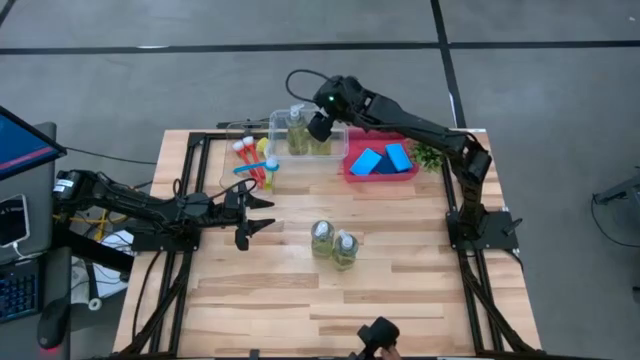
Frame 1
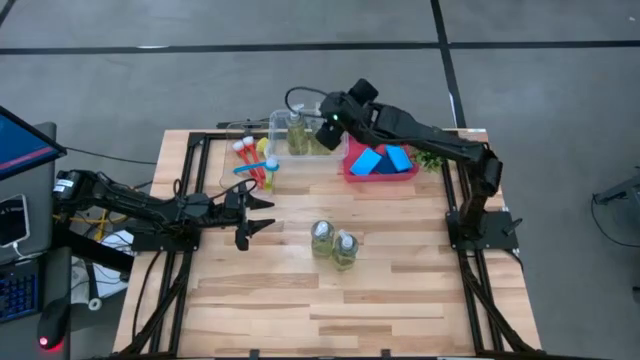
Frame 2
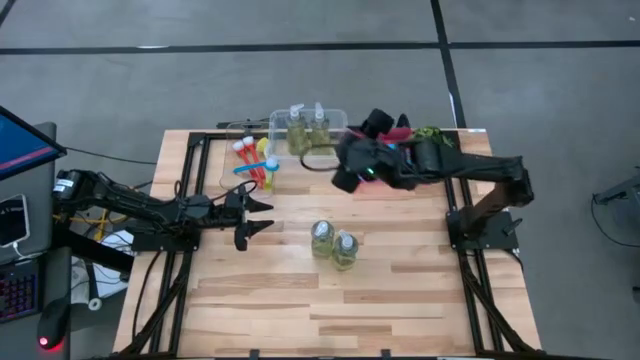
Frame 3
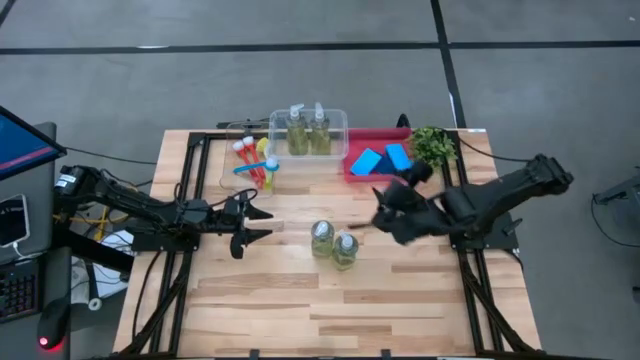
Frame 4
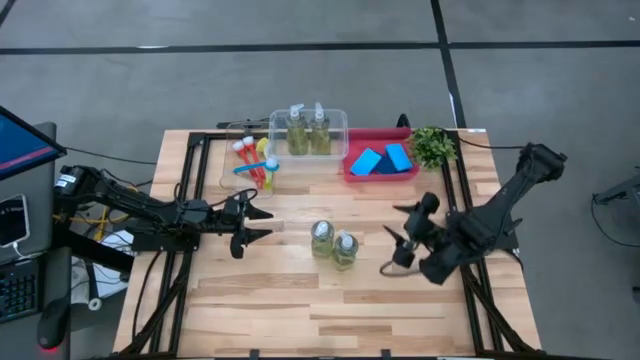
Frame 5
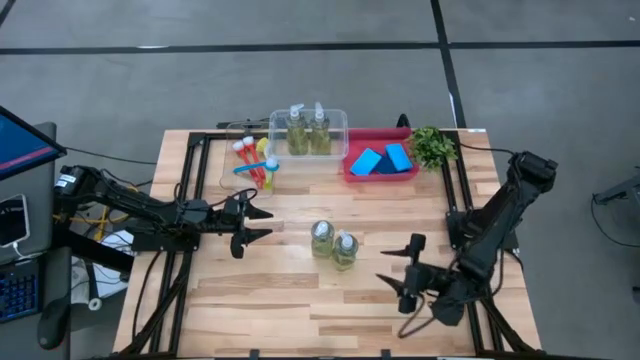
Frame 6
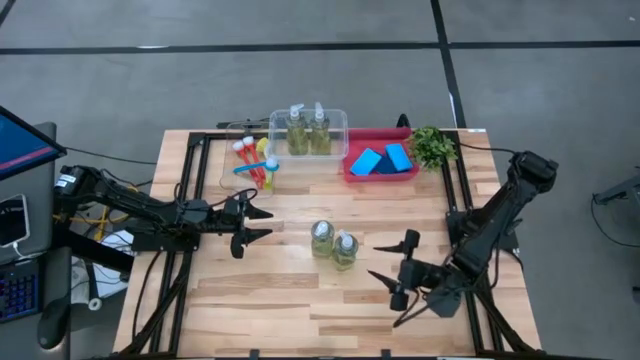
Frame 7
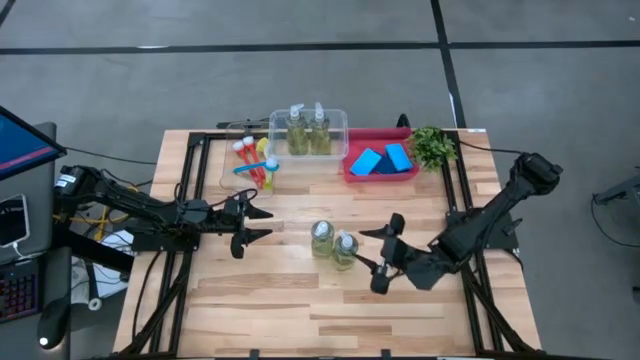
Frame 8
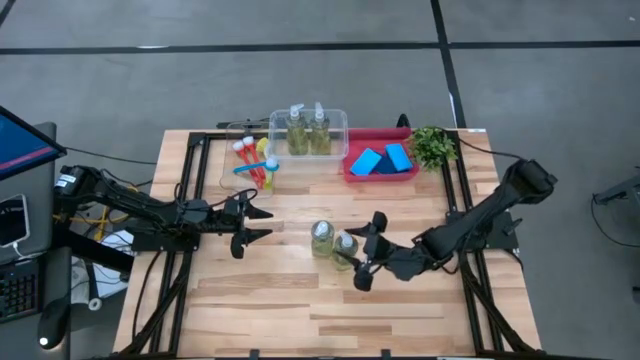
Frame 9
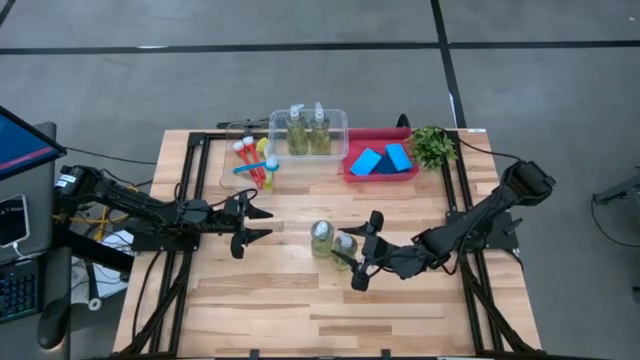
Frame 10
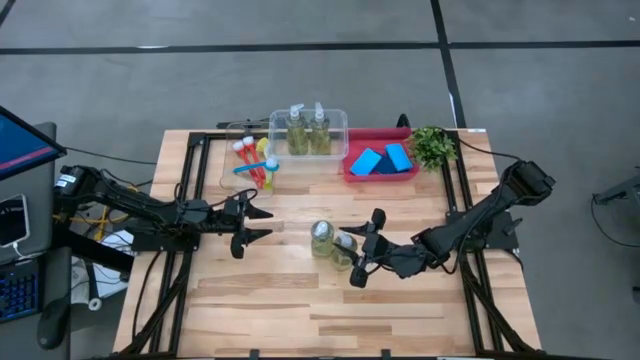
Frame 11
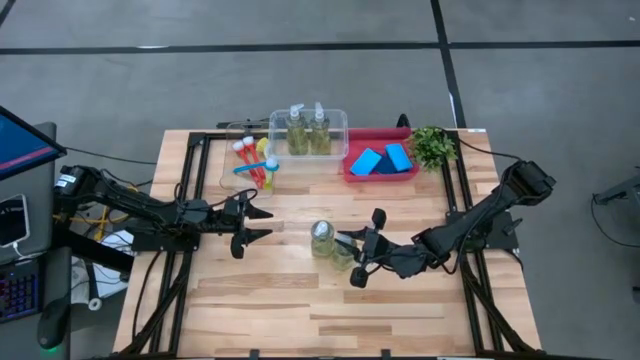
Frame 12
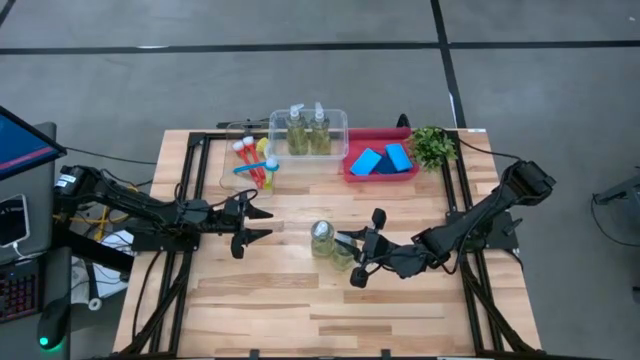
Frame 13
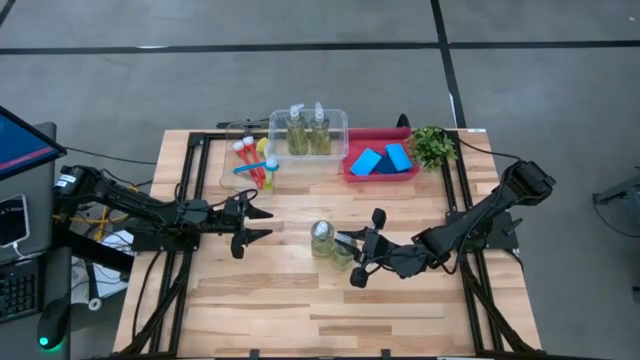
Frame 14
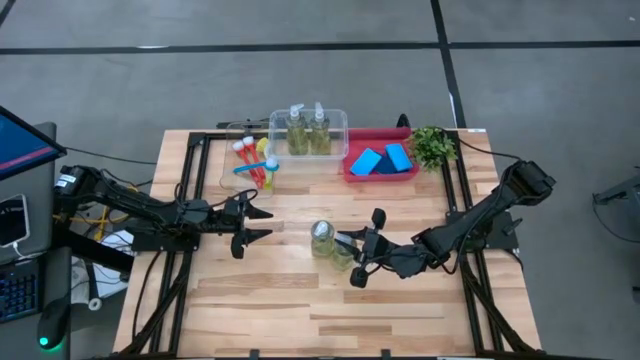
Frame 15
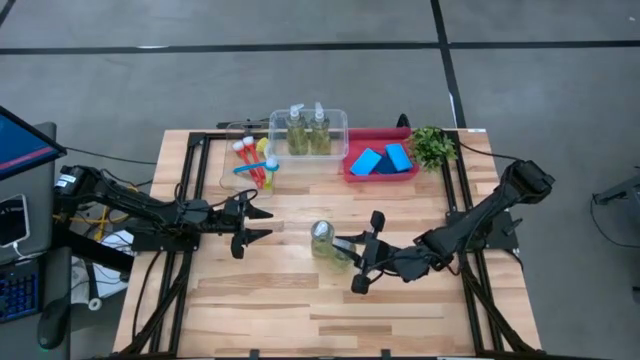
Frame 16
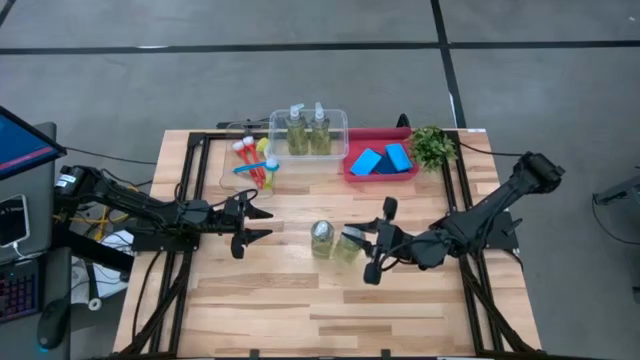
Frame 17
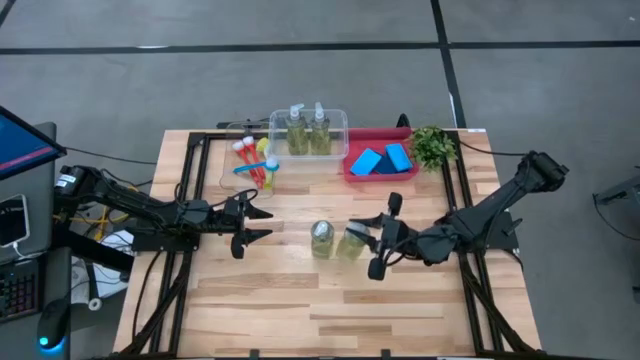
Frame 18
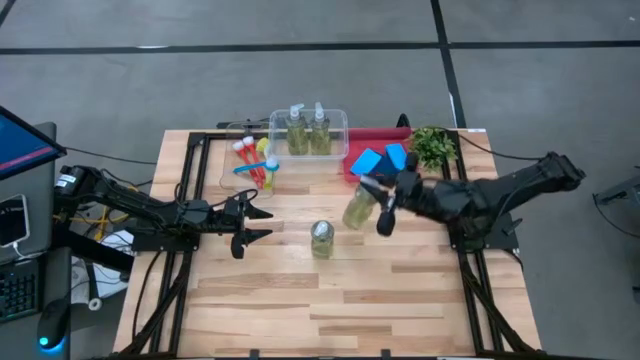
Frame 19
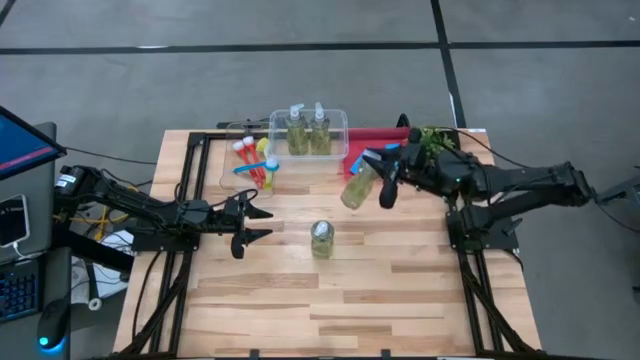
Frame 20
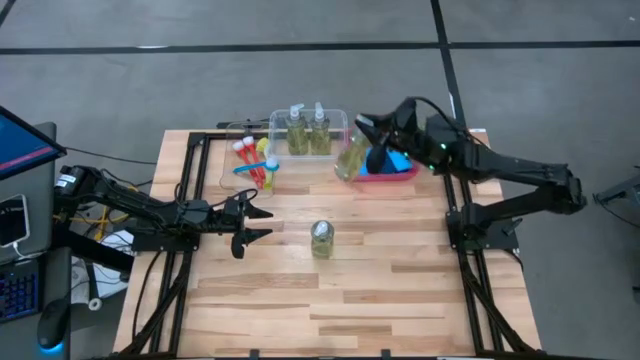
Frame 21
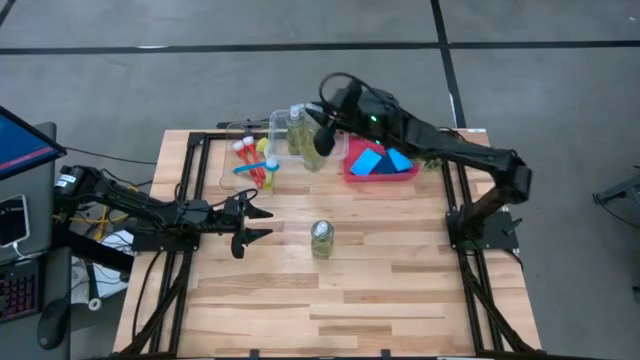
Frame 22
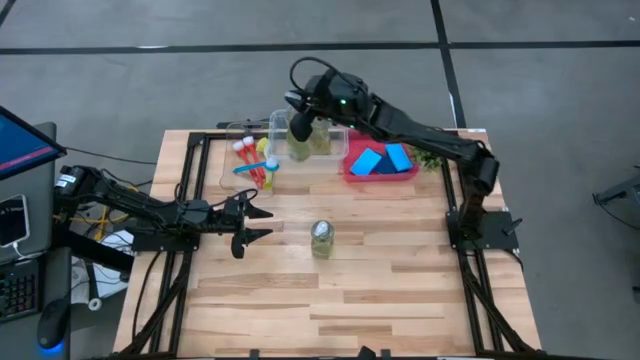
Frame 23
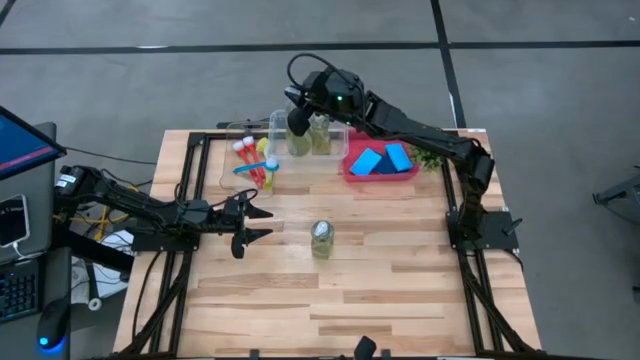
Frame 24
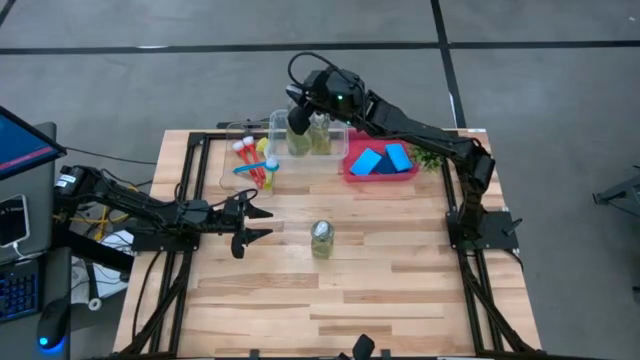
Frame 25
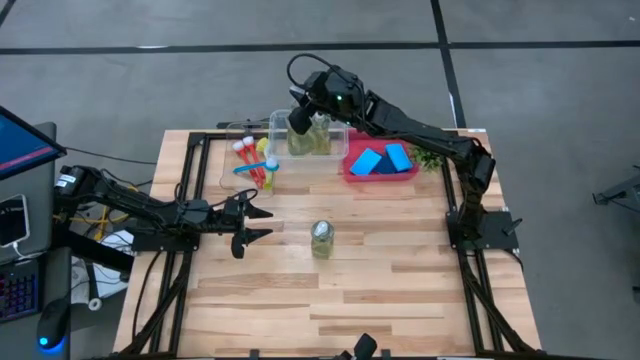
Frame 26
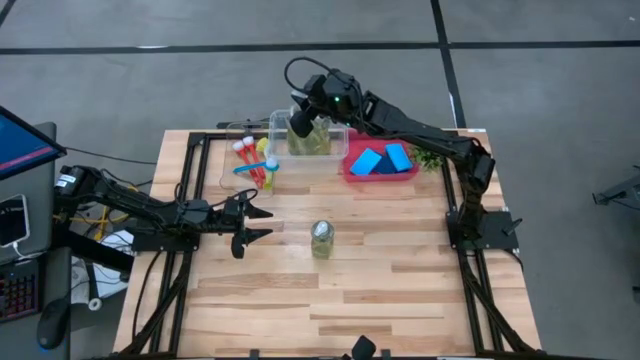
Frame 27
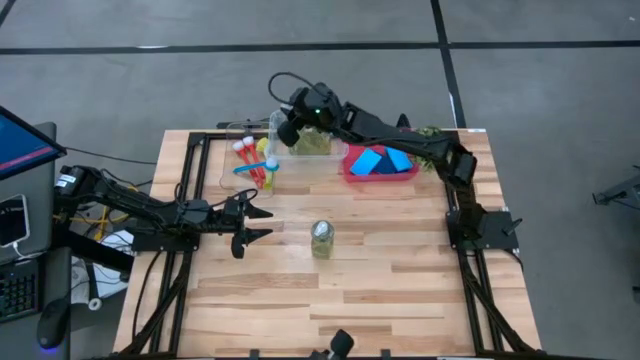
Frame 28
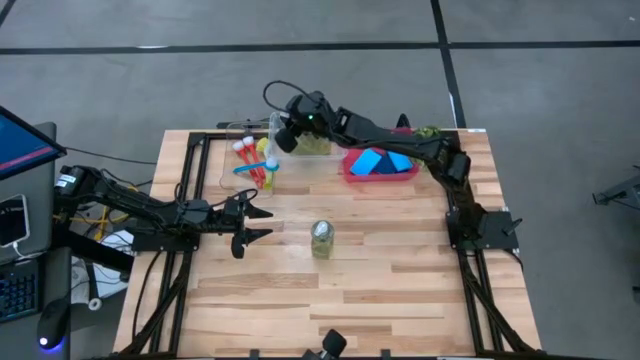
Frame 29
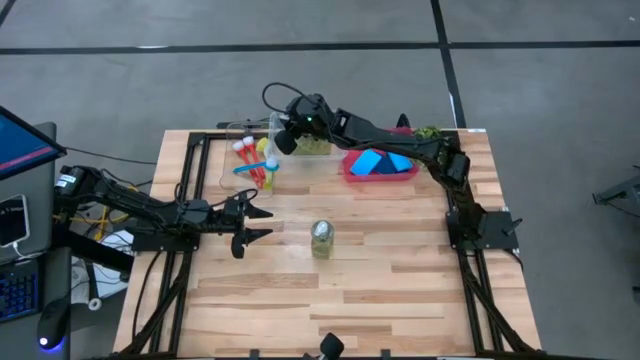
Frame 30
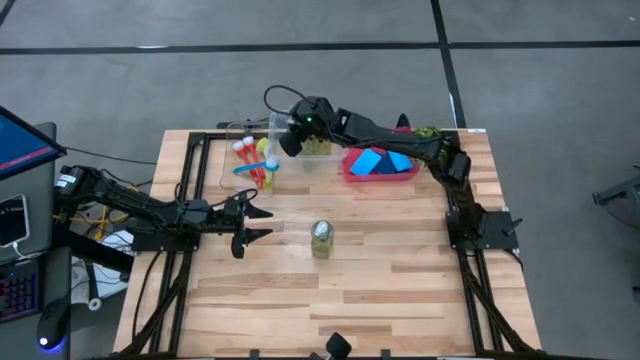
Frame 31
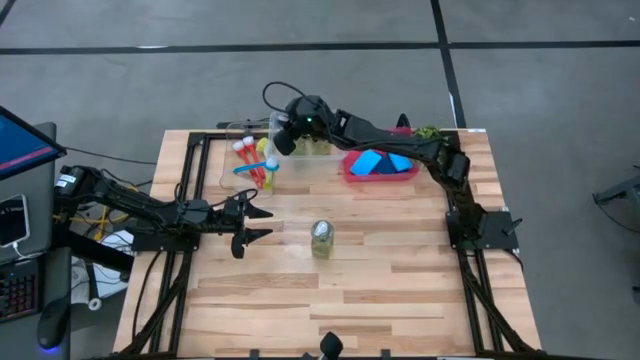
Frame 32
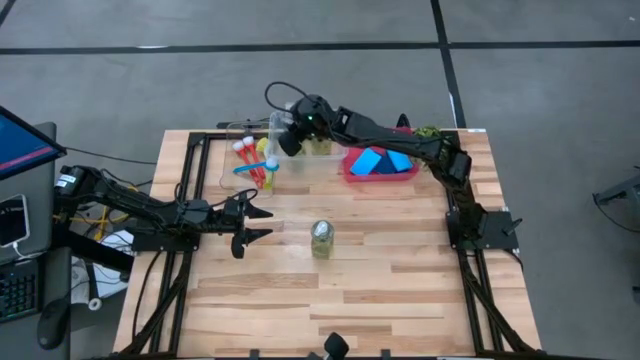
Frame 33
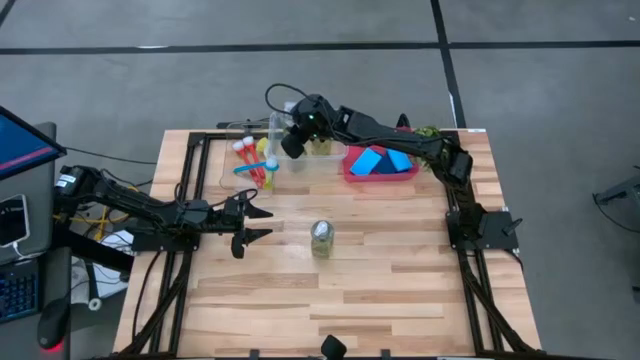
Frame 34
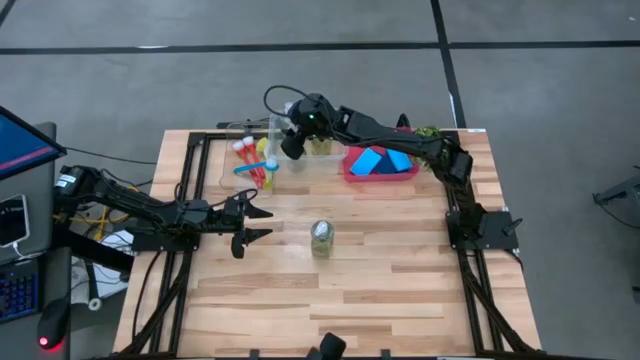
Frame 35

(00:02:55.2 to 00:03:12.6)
Task: Pick & Place Kitchen Sink Supplies
Put the yellow dishwashing liquid dispenser bottle into the right transparent bin

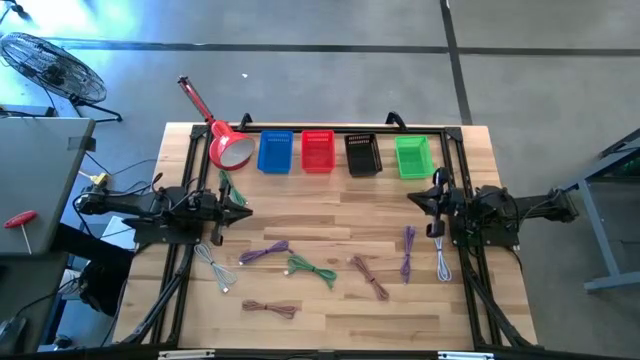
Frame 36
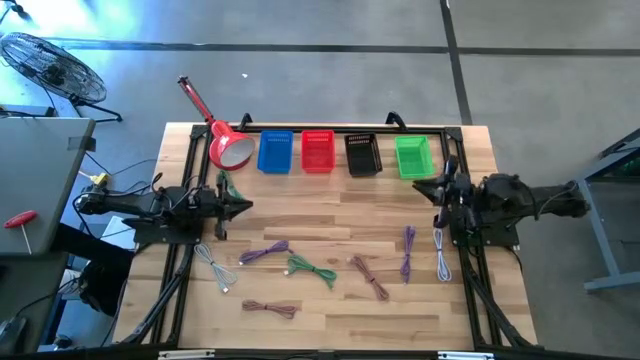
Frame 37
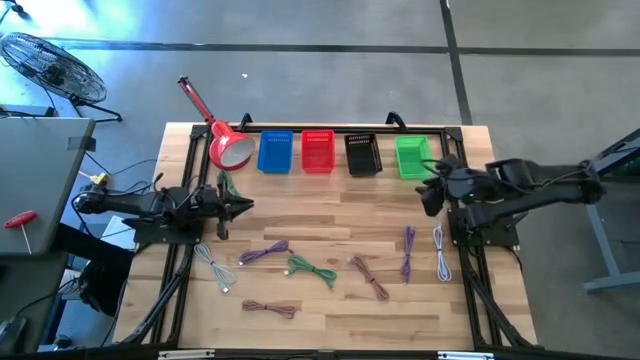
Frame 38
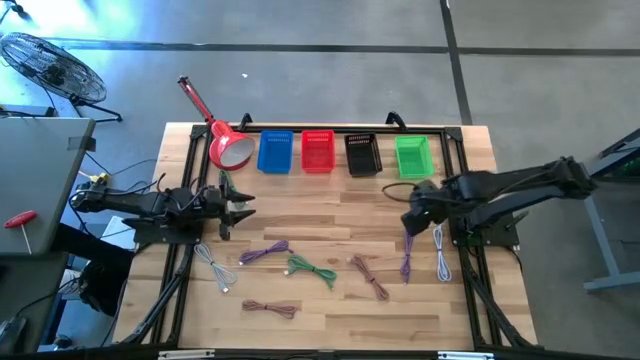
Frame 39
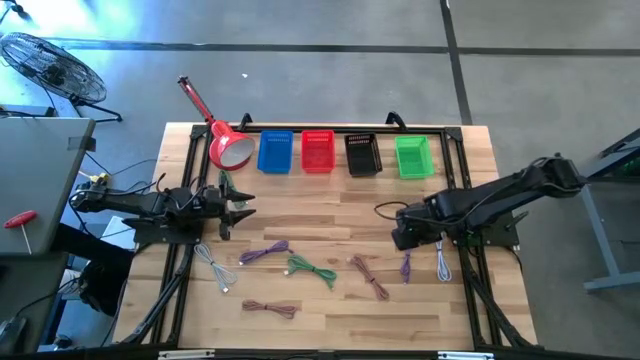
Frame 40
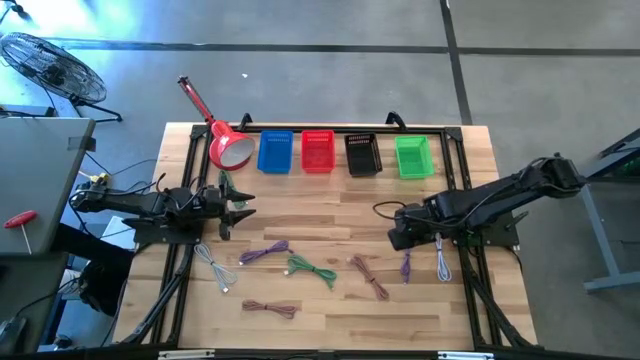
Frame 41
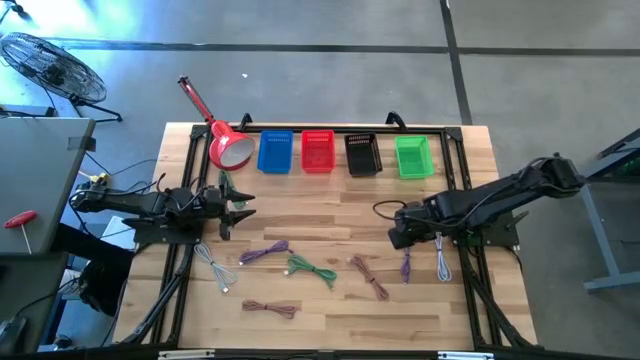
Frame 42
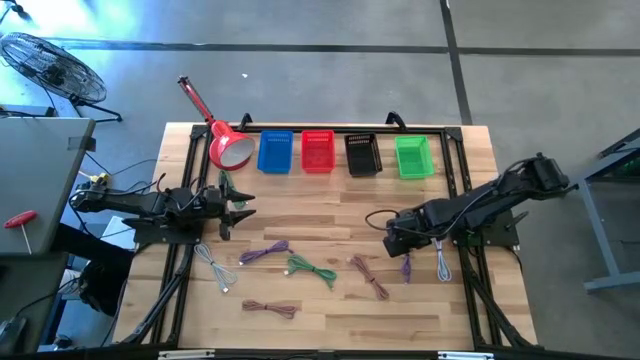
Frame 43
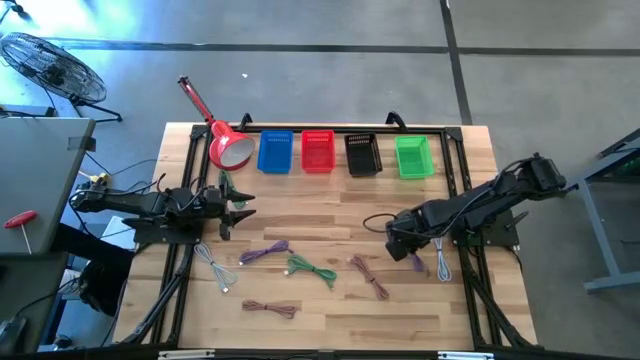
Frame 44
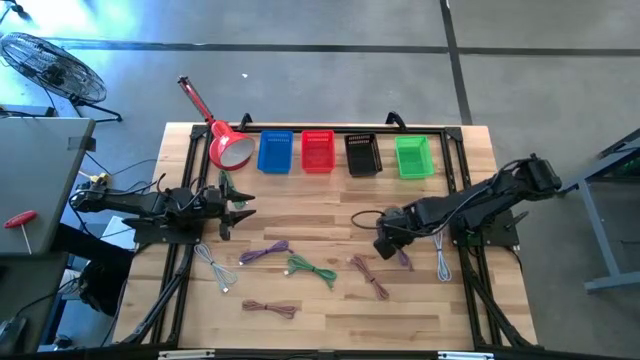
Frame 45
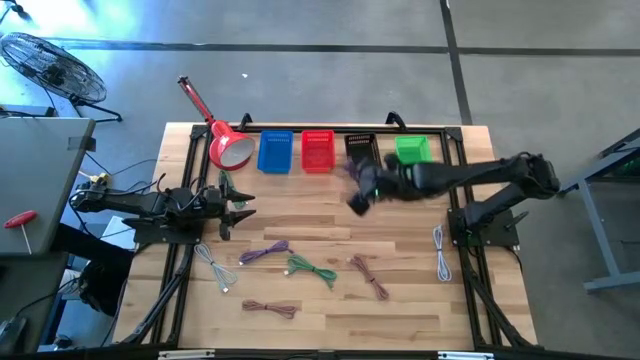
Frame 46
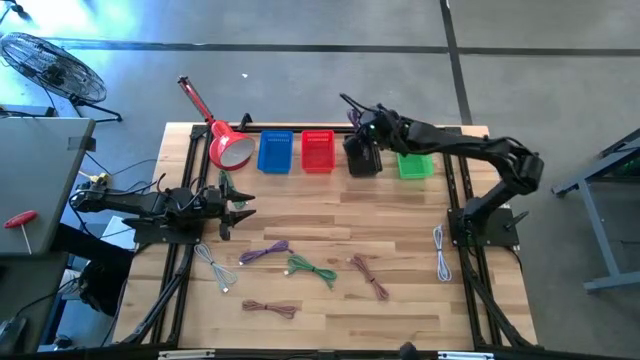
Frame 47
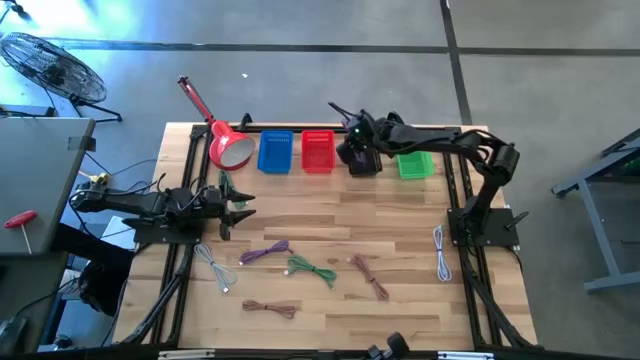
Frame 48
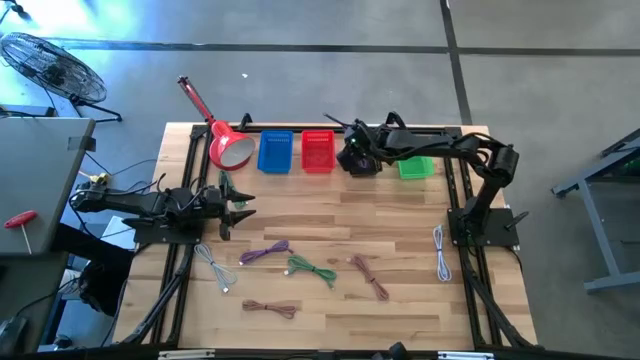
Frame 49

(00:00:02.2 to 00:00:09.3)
Task: Pick & Place USB Port
Put the right violet charger cable into the black bin
